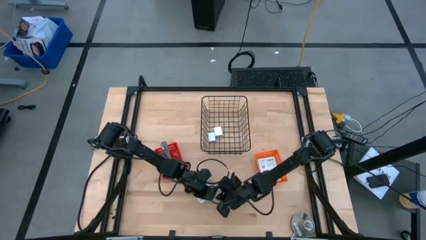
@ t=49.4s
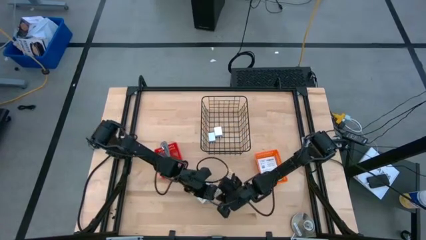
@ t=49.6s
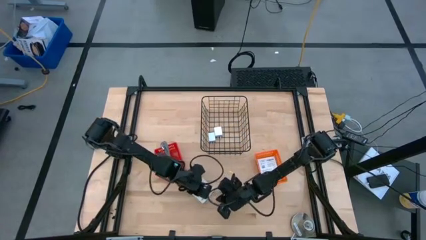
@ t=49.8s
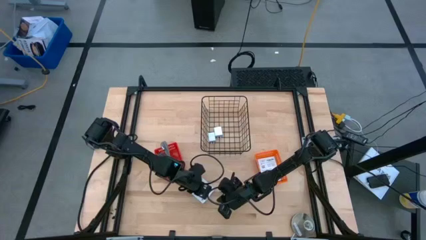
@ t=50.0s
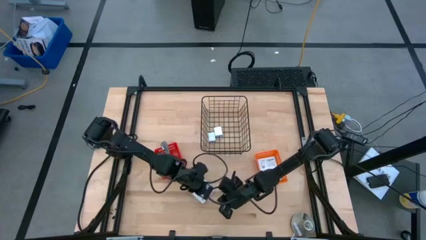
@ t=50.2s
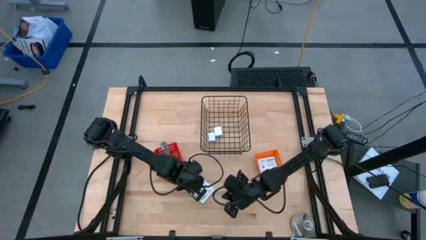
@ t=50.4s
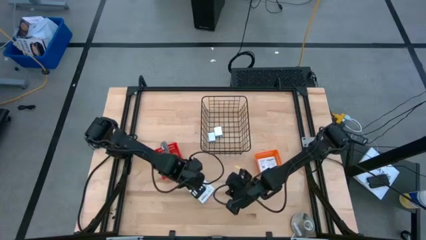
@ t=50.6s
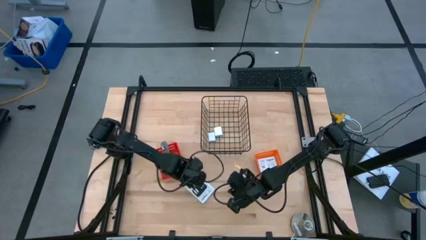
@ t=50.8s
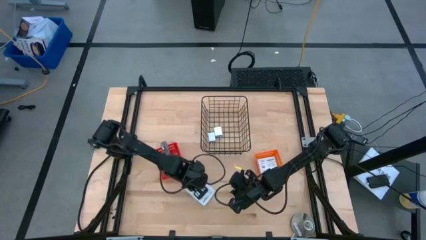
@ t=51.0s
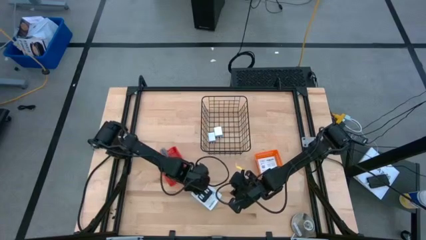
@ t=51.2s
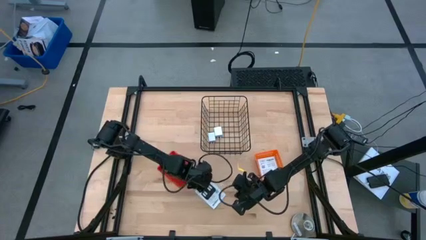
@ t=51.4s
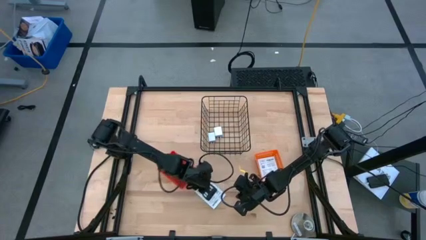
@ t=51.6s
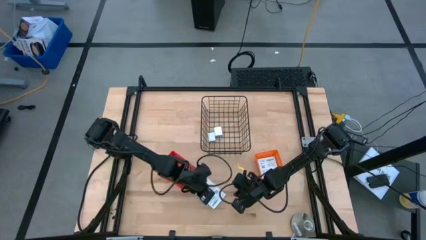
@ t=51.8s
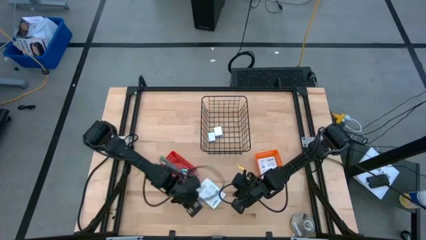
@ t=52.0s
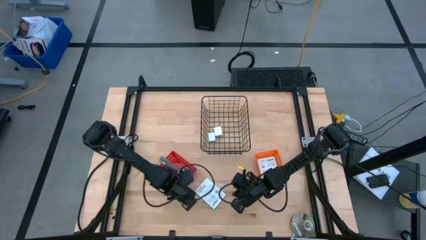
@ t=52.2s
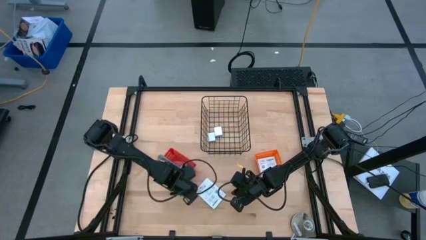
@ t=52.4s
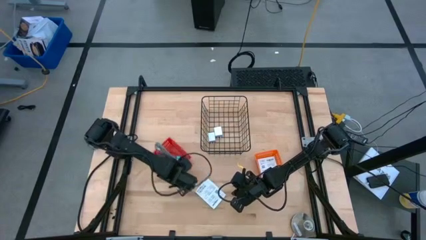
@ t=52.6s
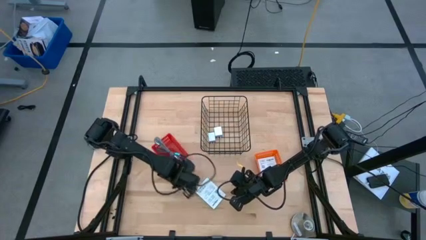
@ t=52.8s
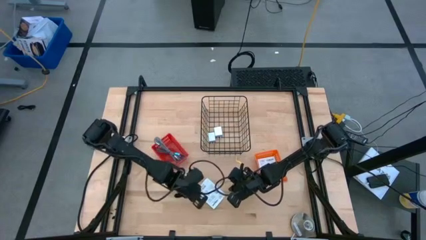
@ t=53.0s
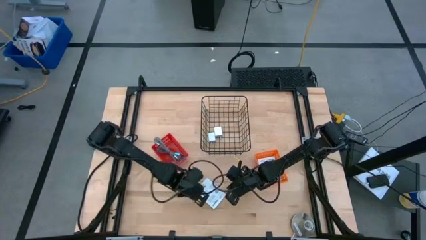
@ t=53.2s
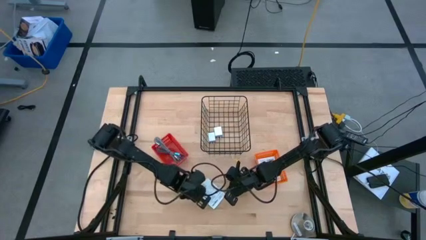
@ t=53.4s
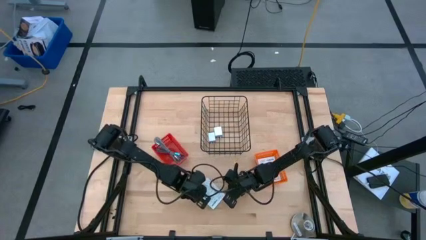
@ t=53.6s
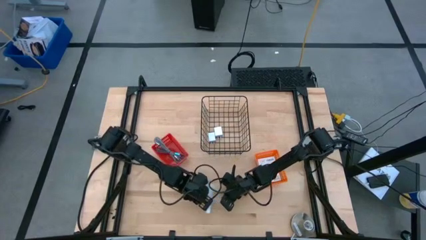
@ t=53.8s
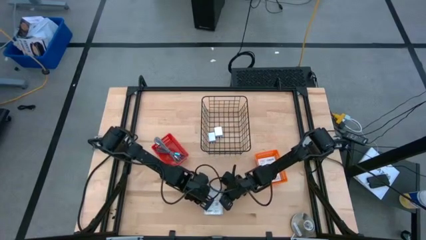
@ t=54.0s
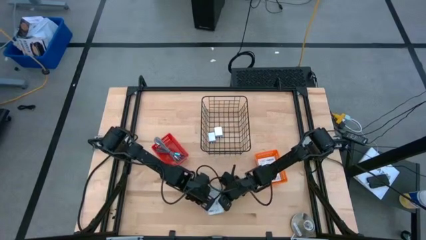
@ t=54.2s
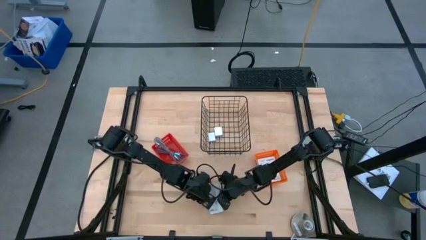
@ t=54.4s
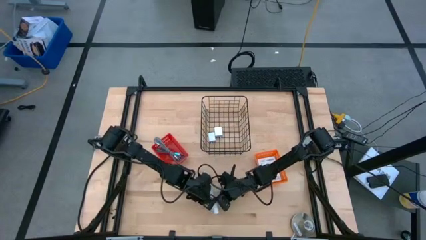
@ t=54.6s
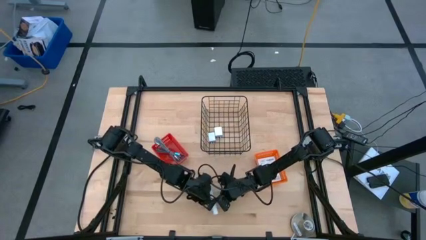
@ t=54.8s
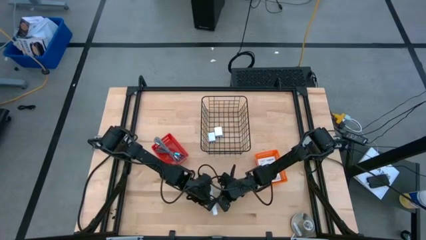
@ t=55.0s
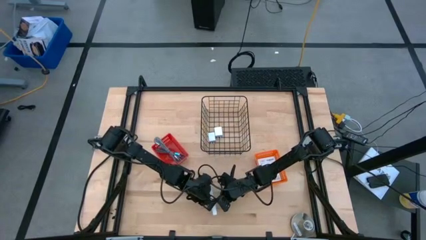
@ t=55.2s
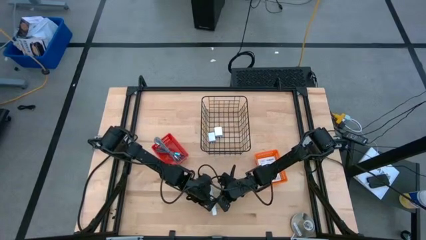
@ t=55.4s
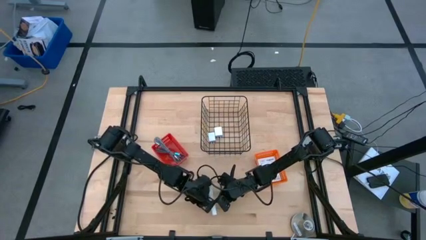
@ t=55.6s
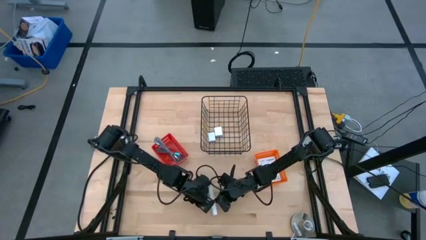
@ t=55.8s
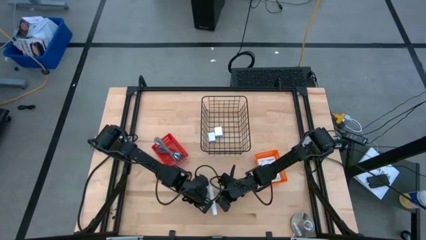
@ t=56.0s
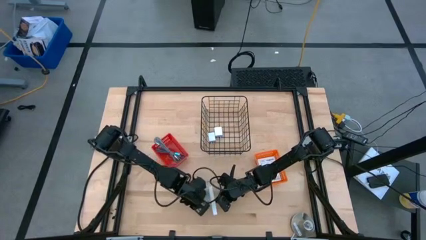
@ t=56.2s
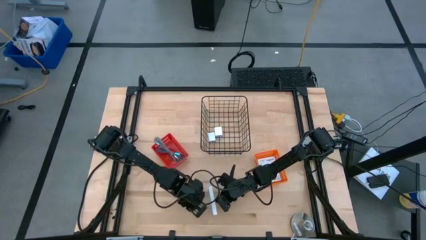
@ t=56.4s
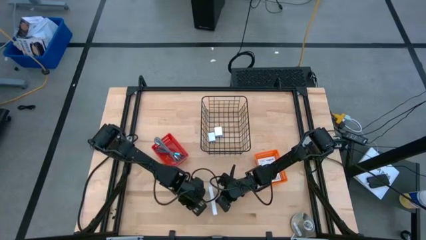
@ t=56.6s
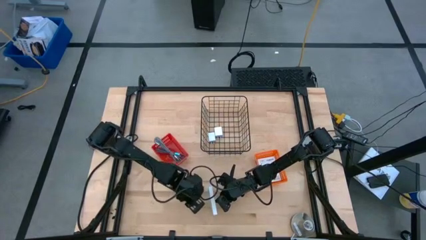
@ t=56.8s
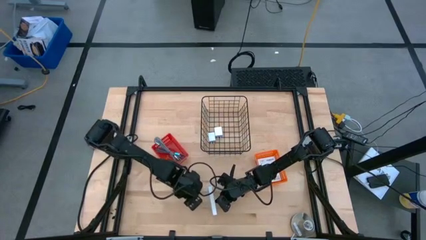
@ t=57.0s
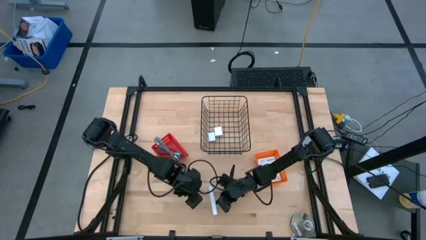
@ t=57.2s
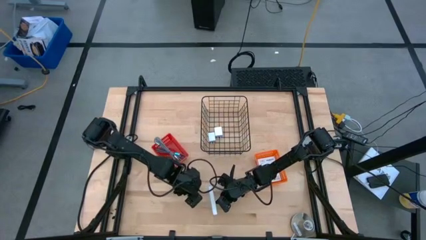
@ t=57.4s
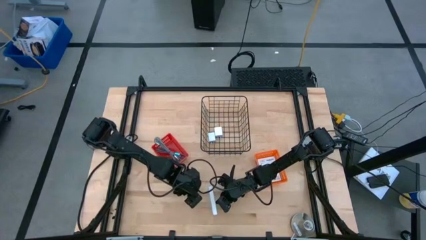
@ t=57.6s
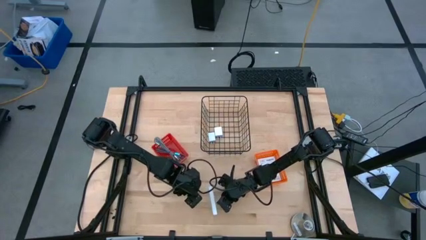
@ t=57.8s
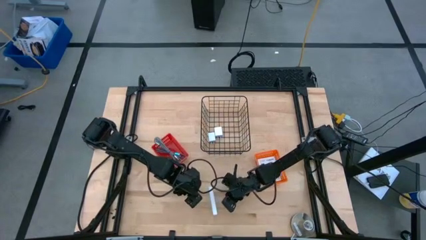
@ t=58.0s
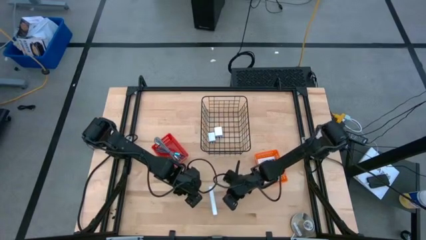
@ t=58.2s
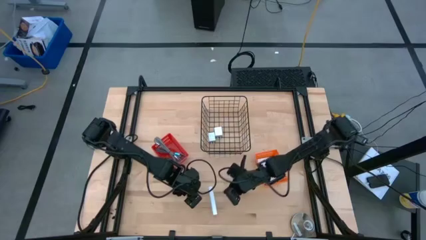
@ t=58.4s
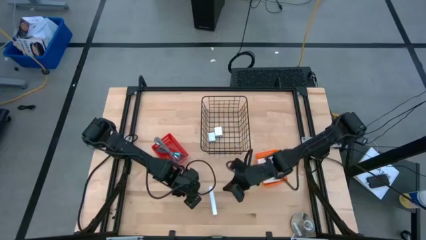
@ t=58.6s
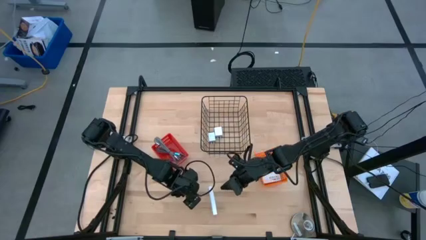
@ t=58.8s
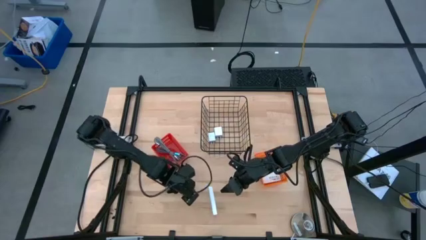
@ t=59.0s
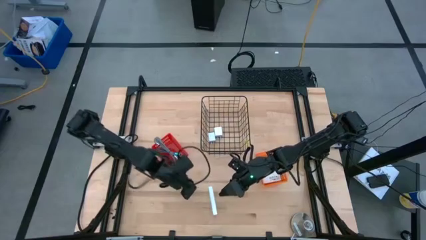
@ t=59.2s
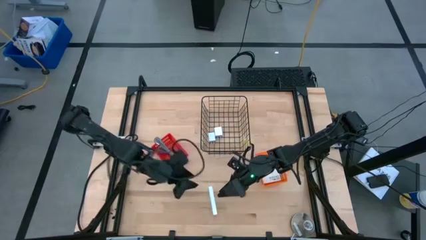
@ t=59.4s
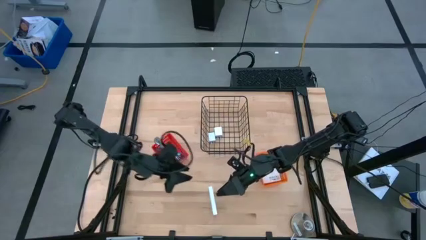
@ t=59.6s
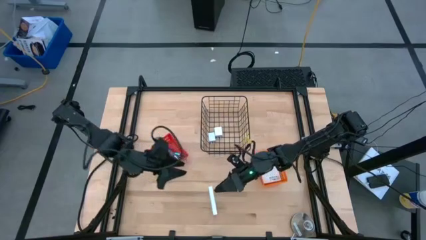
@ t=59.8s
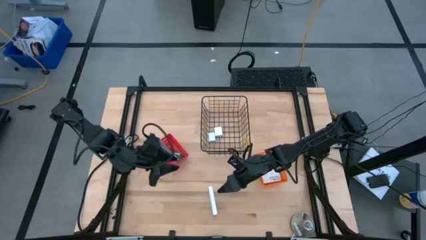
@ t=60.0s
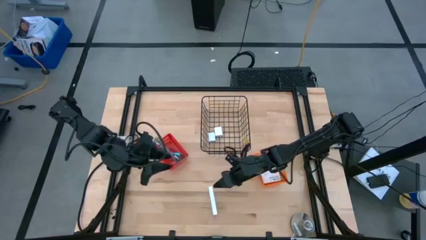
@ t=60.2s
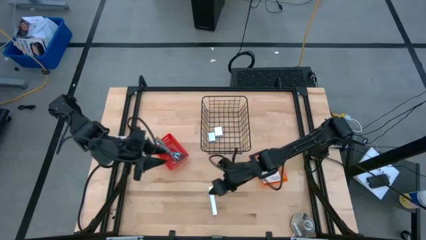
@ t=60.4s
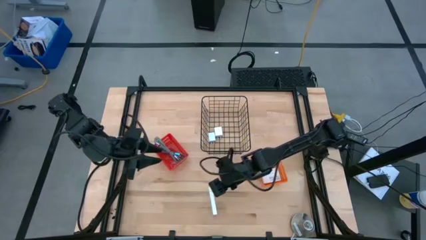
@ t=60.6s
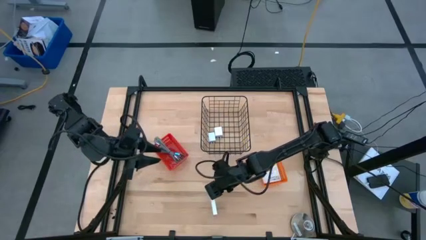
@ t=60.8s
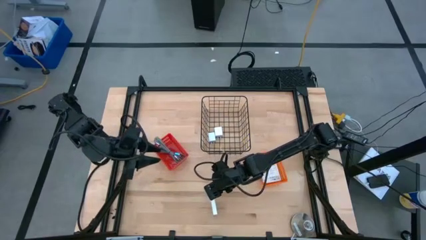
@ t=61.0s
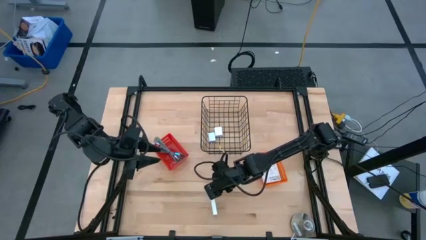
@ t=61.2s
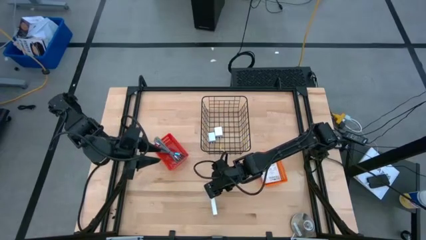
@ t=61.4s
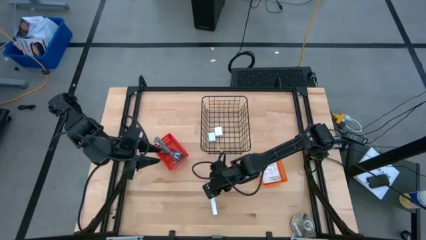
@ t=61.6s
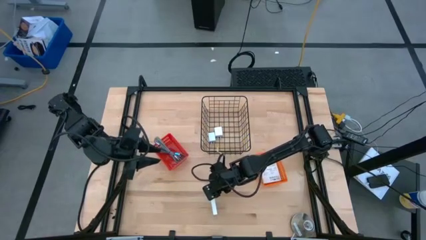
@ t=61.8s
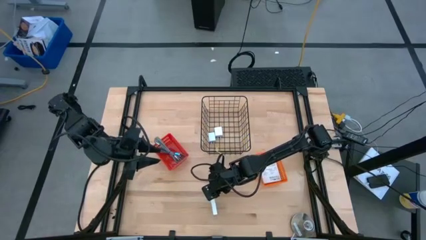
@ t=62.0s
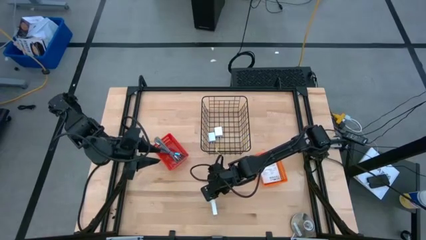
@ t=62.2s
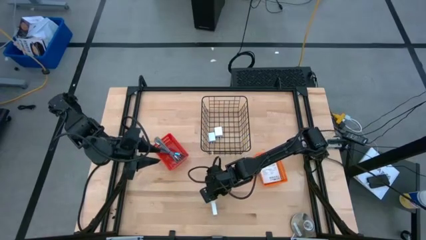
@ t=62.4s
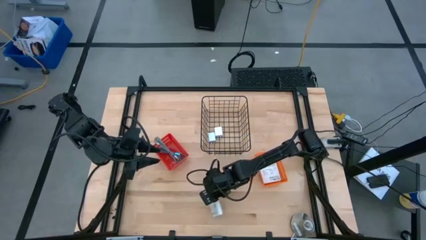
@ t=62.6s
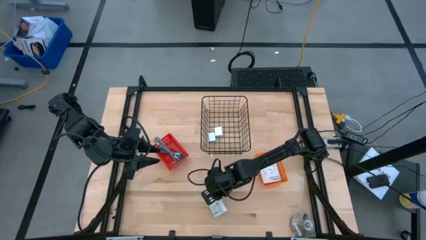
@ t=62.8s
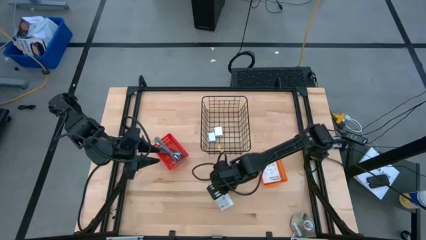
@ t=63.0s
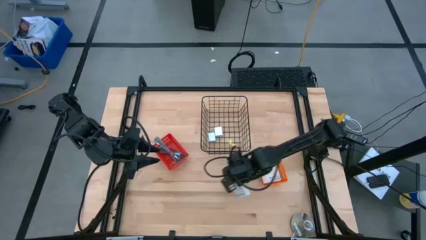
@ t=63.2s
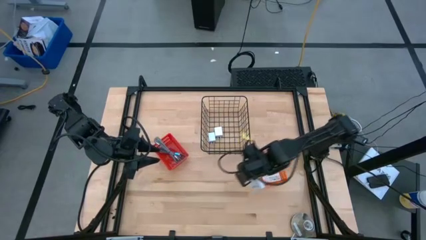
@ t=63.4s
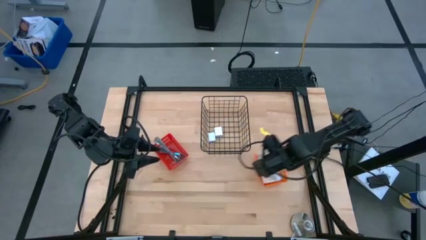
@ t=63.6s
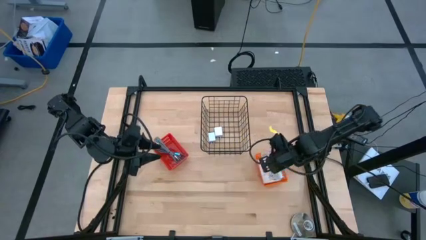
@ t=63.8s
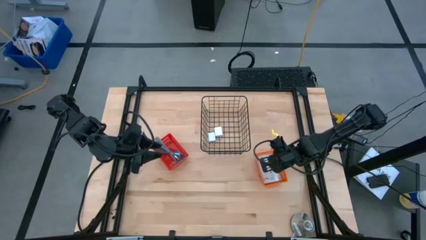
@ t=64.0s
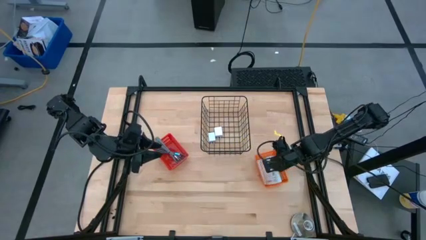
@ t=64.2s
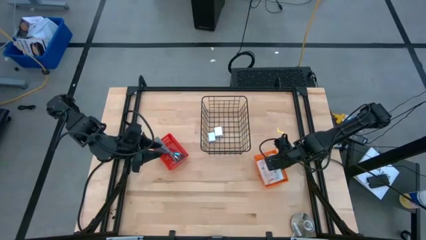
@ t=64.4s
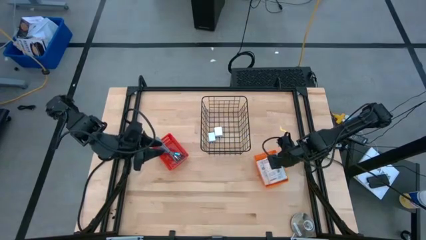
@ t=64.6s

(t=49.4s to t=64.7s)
Task: Pick and place items into bin
Put the white card reader box into the orange bin
